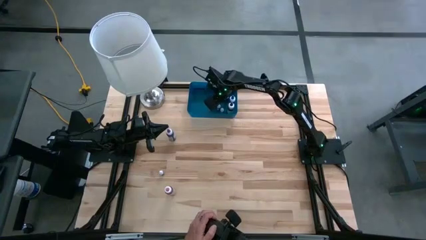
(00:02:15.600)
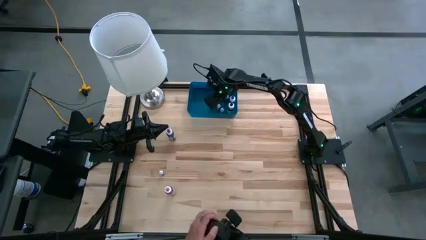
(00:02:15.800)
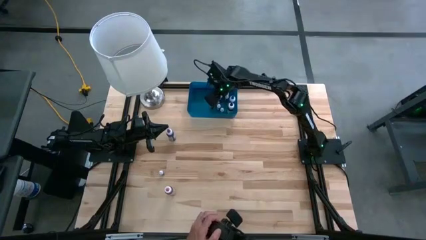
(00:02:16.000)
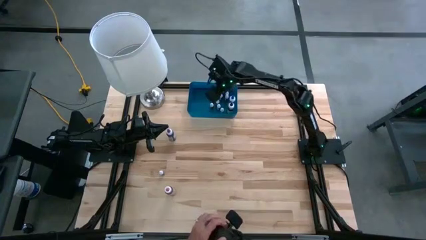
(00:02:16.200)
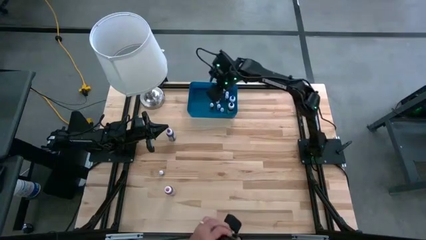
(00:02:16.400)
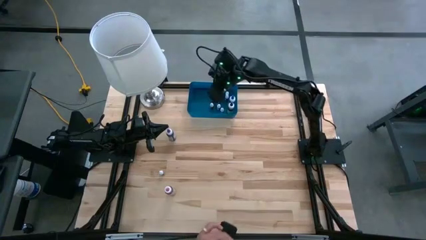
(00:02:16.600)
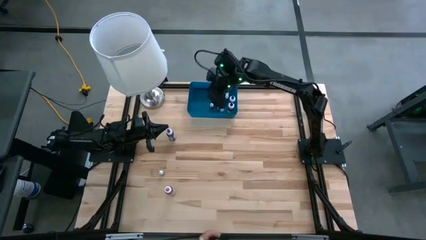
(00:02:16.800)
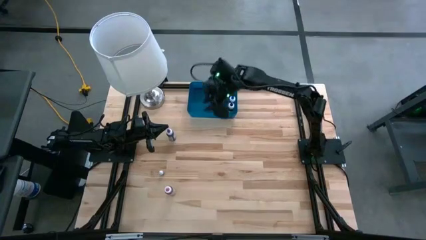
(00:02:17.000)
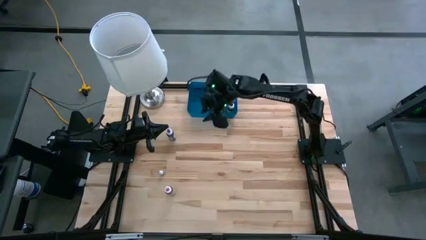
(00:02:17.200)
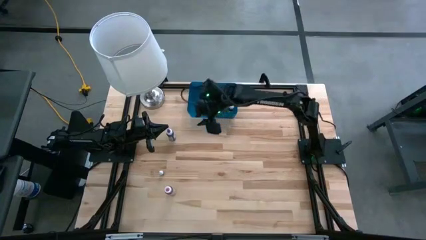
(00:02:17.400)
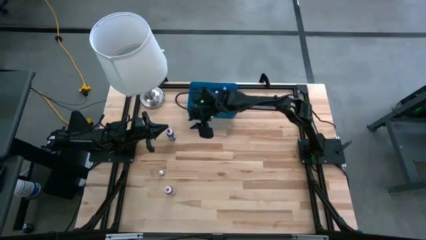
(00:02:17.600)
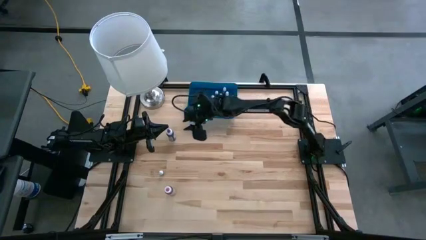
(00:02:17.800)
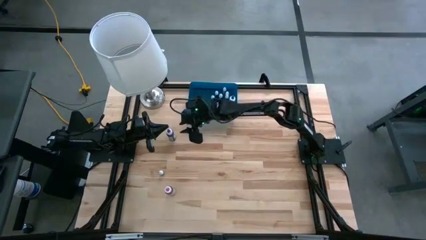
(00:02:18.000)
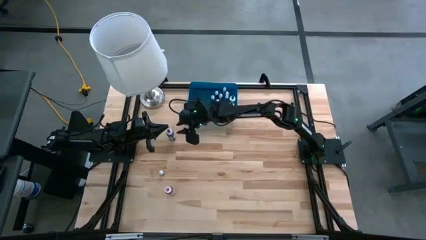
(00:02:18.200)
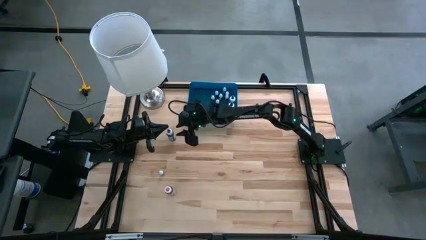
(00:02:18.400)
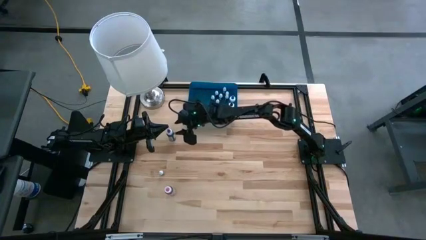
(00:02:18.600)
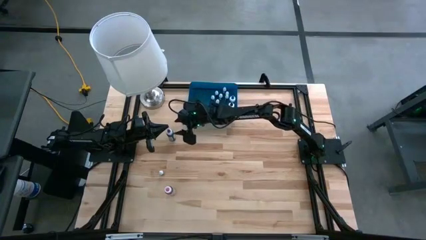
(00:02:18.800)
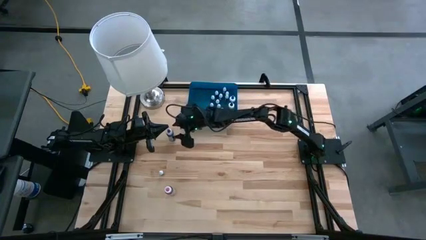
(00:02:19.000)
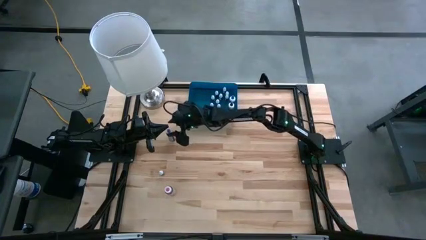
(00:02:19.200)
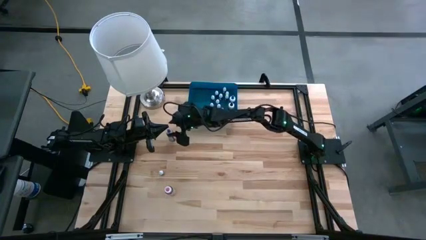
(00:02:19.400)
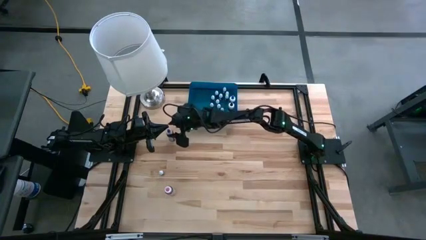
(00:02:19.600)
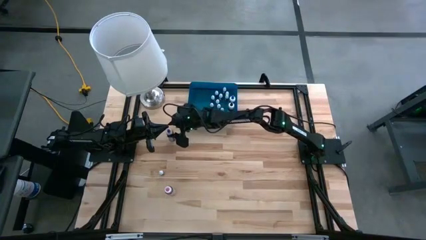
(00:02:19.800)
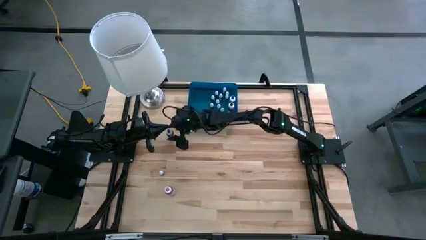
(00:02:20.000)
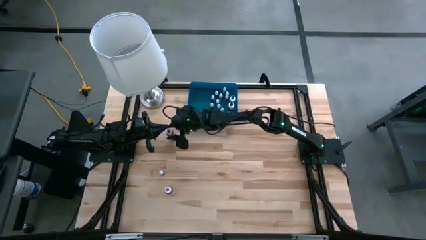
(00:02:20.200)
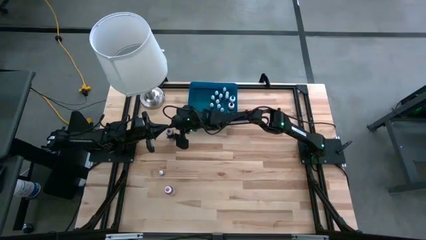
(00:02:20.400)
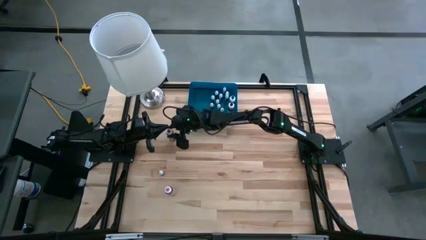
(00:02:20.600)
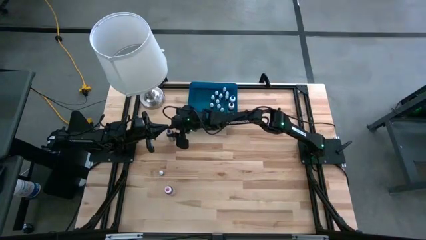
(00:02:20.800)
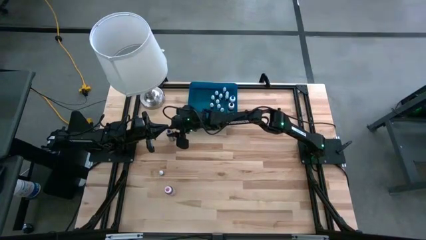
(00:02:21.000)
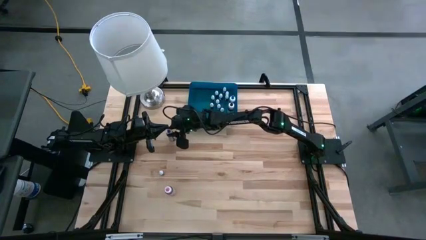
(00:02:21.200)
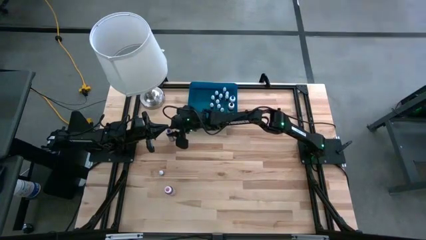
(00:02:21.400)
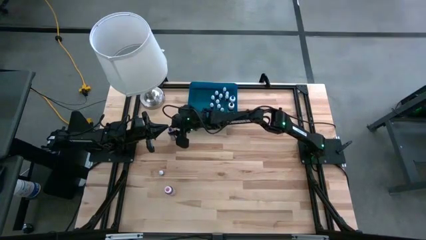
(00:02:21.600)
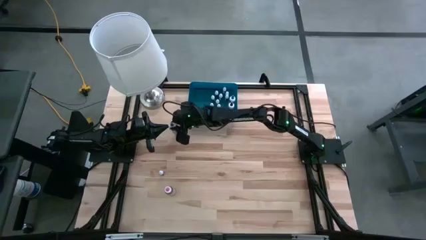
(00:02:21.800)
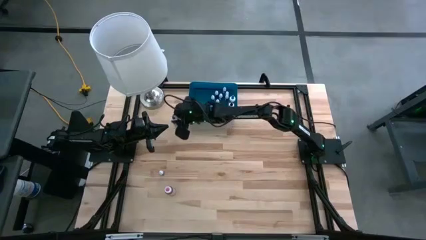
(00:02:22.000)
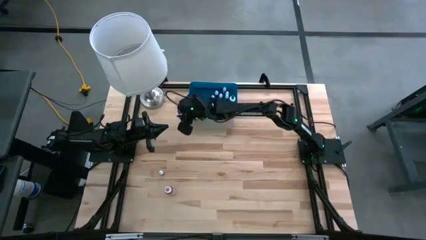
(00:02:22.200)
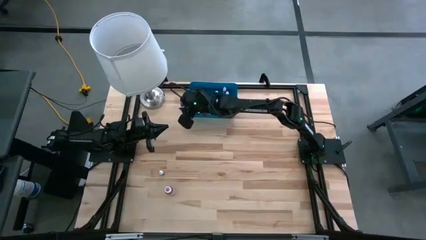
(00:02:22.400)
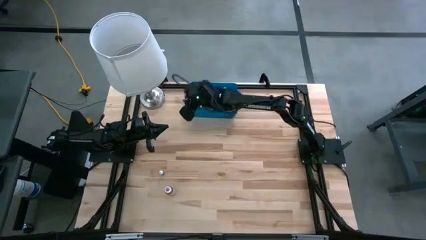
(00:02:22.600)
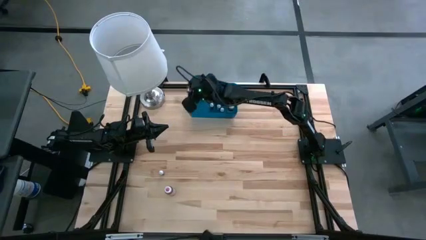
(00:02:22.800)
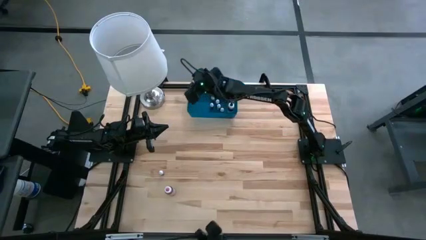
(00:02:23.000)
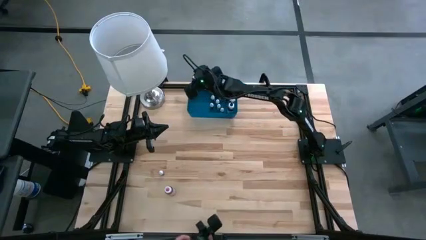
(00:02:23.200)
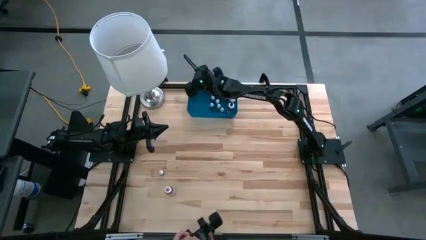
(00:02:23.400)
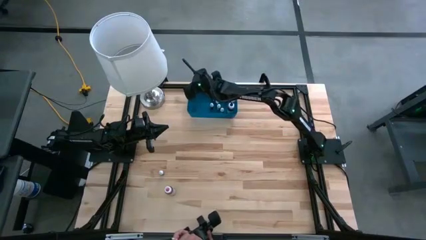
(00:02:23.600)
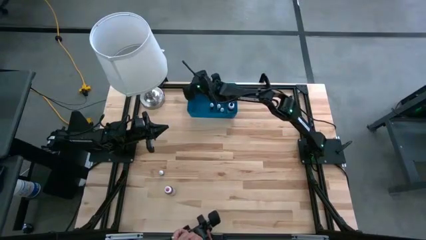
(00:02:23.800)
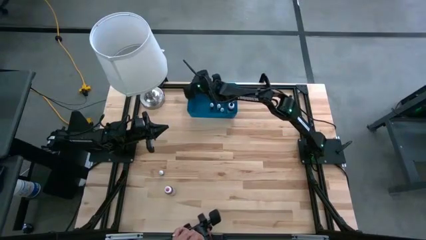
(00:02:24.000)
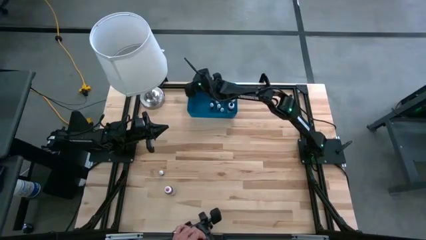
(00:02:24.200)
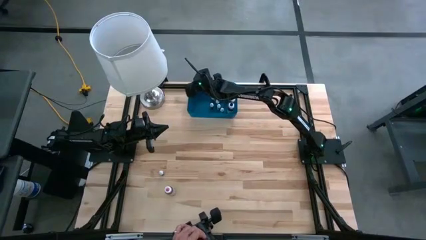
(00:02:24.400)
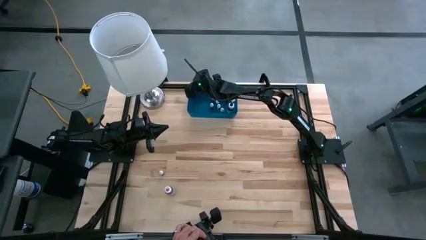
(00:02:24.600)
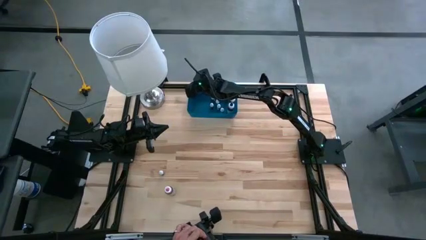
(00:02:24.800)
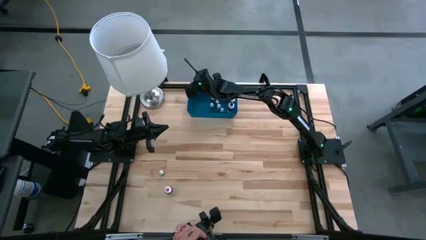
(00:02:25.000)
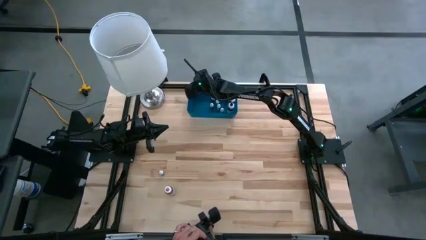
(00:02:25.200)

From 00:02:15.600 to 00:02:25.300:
Task: Pick & Place food coloring
Put the violet food coloring bottle into the blue bin
